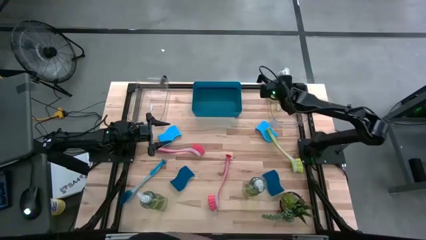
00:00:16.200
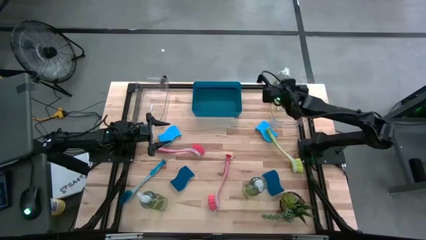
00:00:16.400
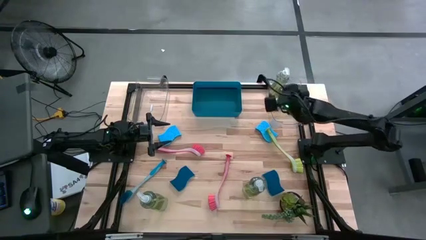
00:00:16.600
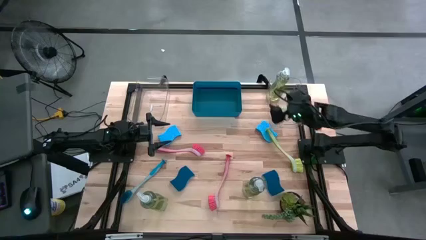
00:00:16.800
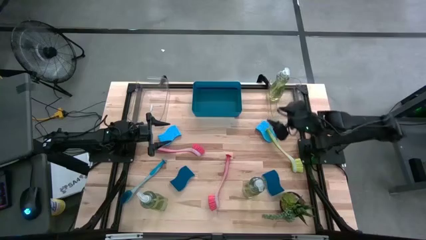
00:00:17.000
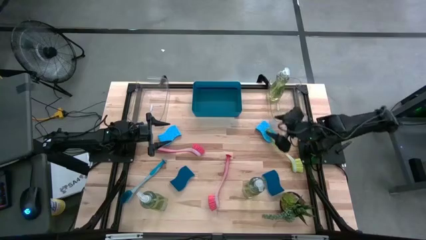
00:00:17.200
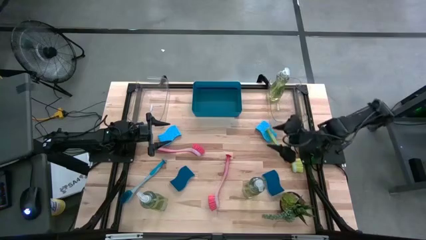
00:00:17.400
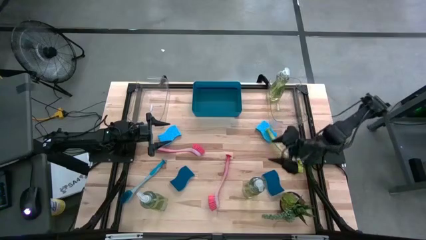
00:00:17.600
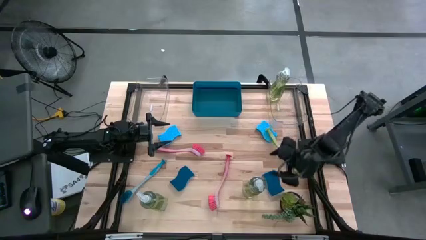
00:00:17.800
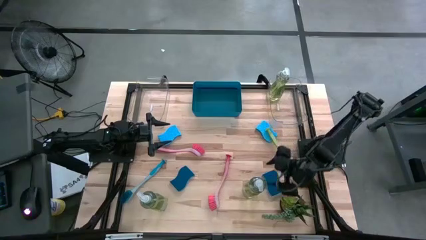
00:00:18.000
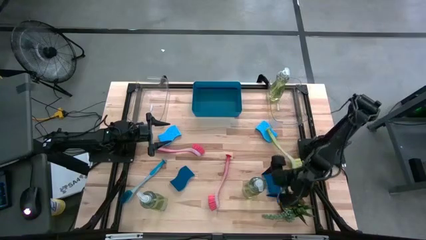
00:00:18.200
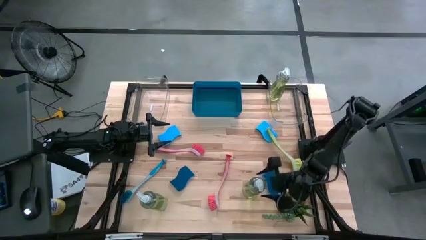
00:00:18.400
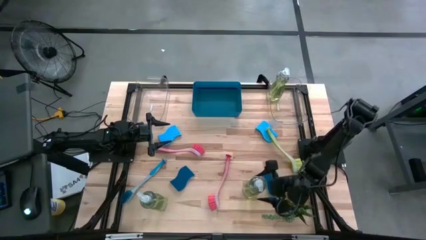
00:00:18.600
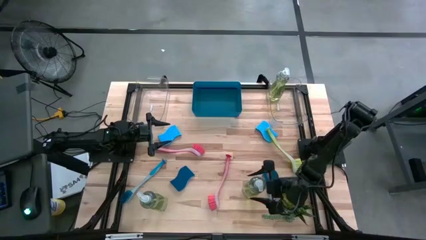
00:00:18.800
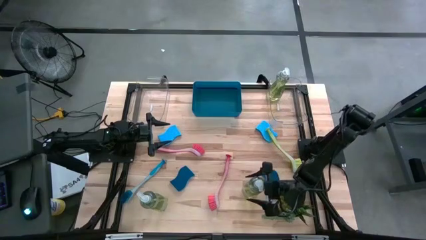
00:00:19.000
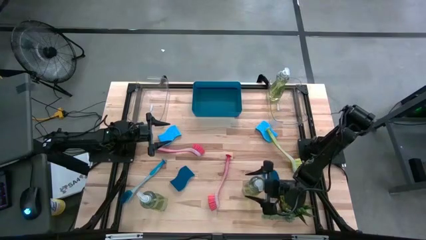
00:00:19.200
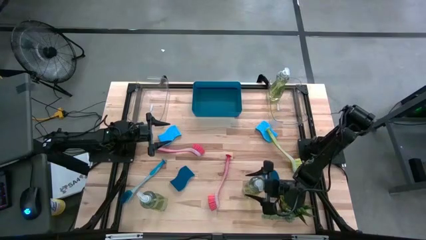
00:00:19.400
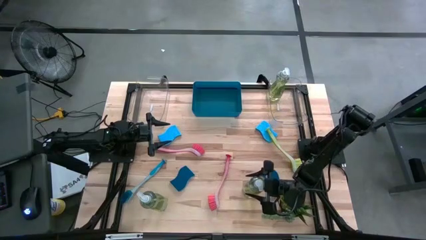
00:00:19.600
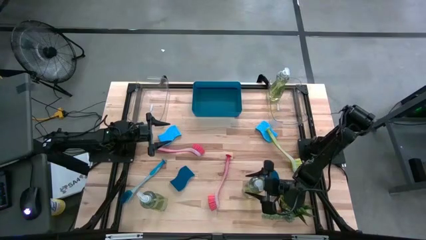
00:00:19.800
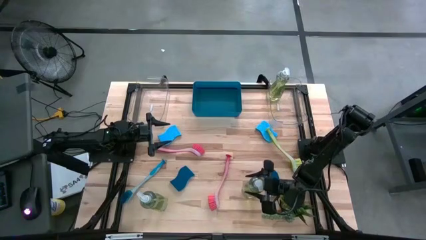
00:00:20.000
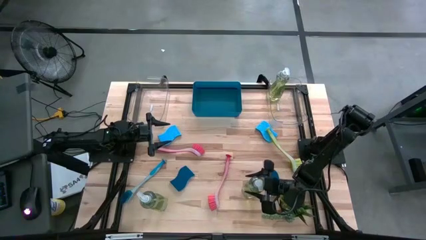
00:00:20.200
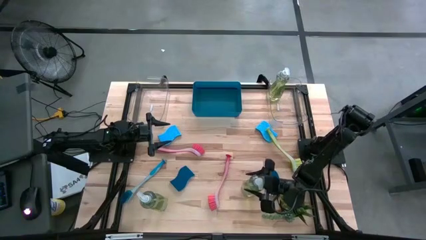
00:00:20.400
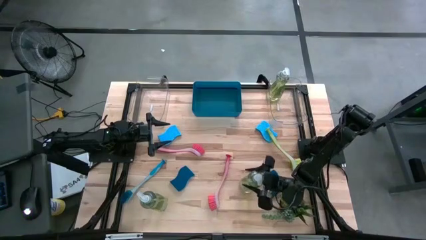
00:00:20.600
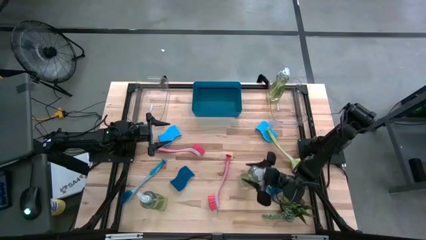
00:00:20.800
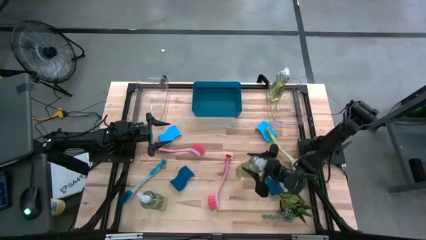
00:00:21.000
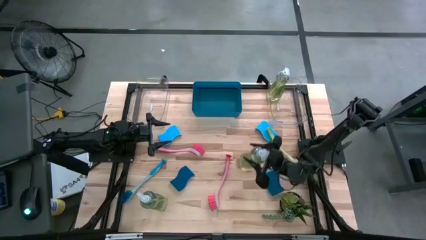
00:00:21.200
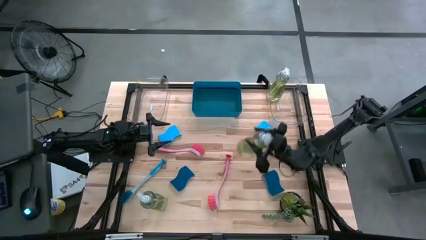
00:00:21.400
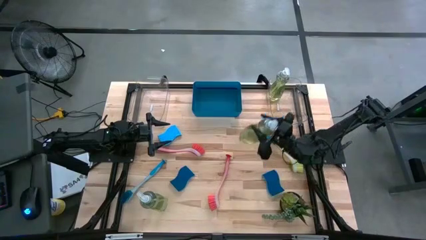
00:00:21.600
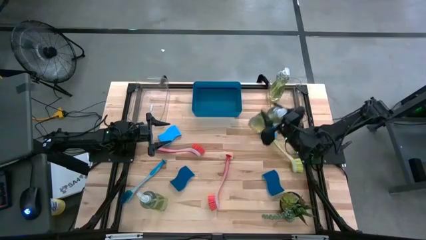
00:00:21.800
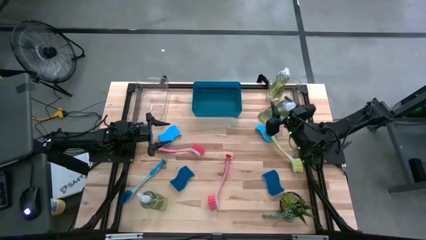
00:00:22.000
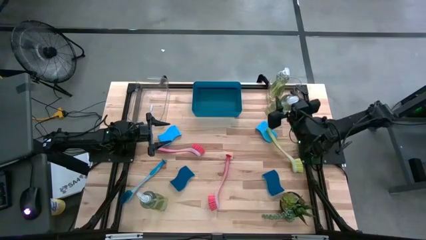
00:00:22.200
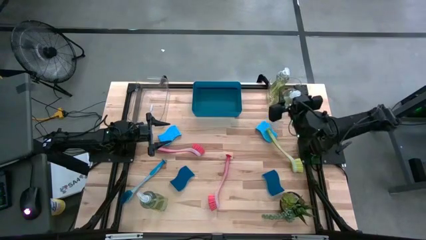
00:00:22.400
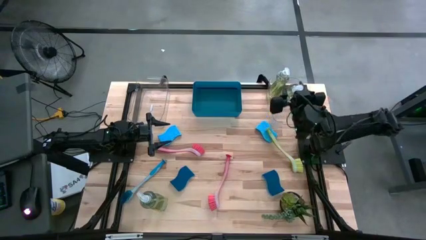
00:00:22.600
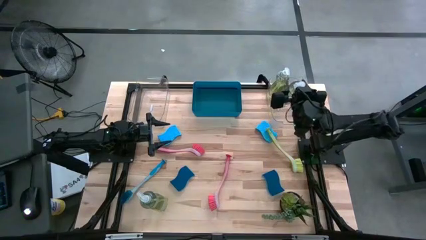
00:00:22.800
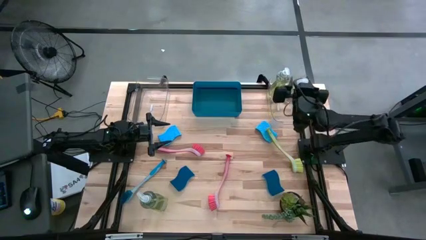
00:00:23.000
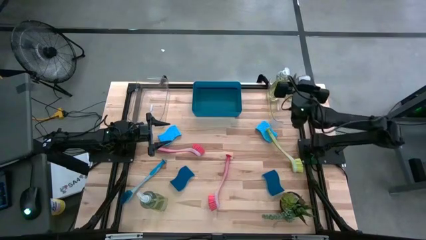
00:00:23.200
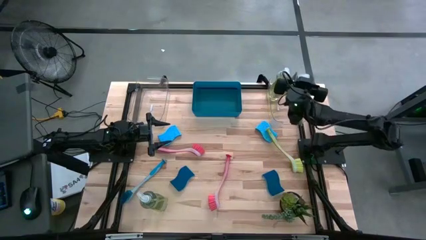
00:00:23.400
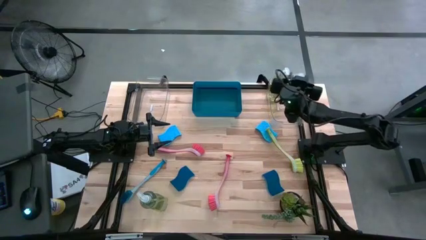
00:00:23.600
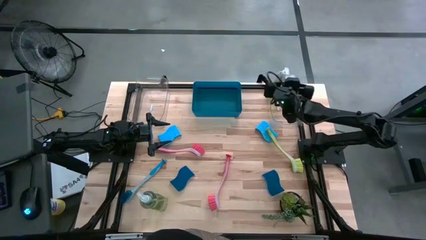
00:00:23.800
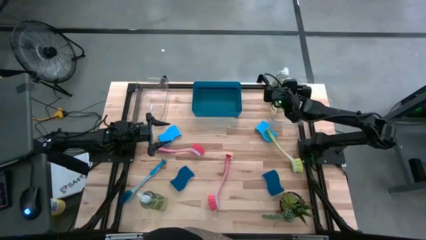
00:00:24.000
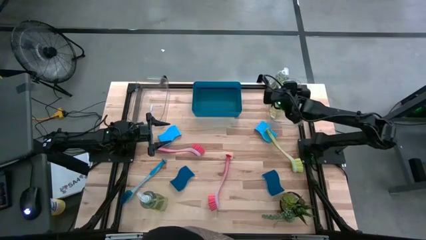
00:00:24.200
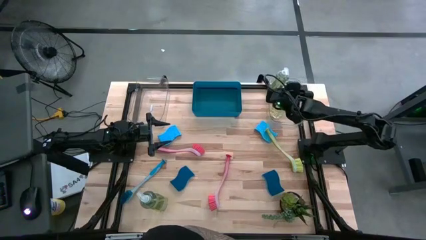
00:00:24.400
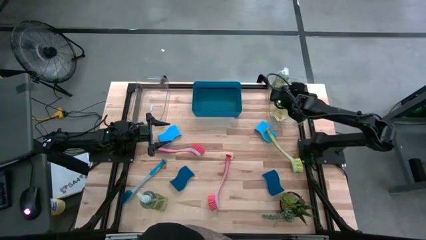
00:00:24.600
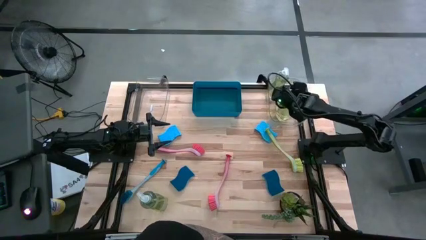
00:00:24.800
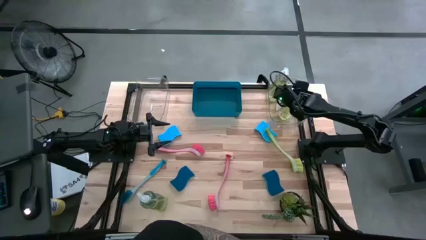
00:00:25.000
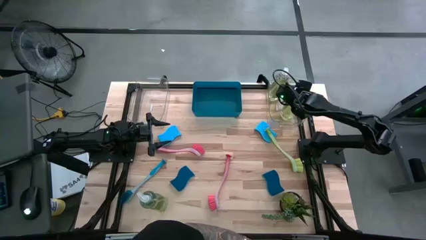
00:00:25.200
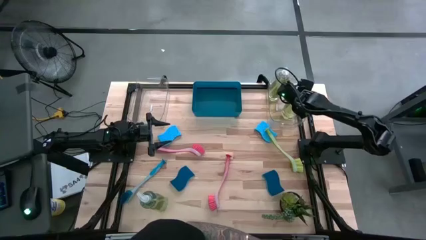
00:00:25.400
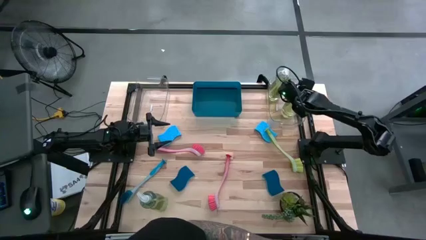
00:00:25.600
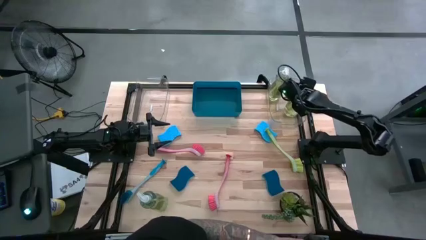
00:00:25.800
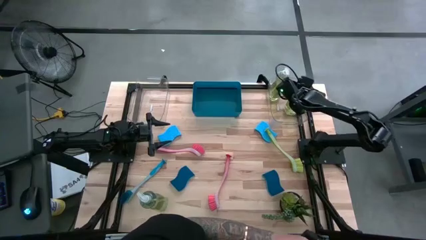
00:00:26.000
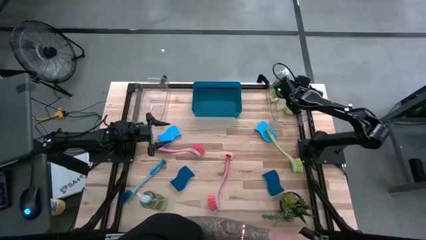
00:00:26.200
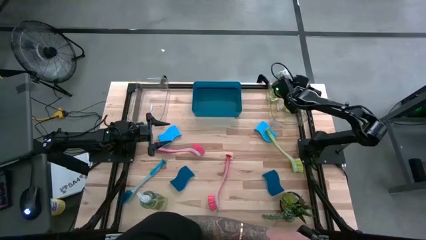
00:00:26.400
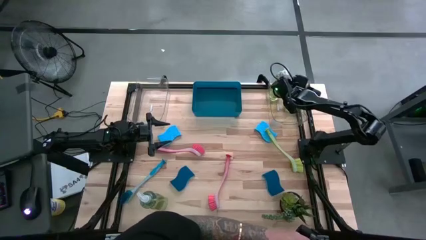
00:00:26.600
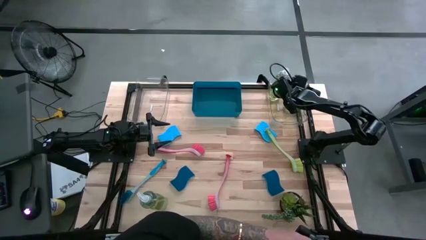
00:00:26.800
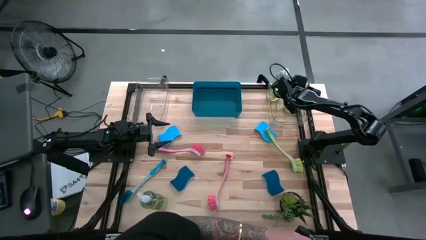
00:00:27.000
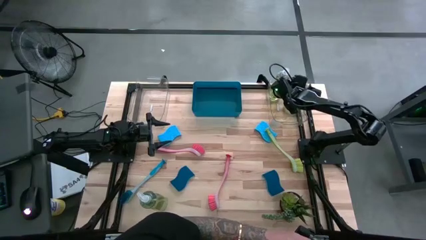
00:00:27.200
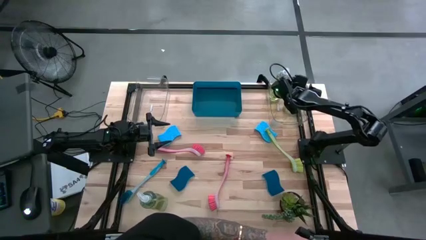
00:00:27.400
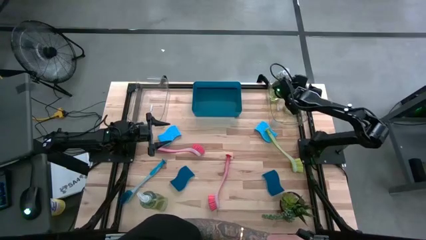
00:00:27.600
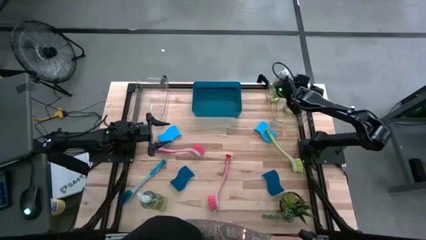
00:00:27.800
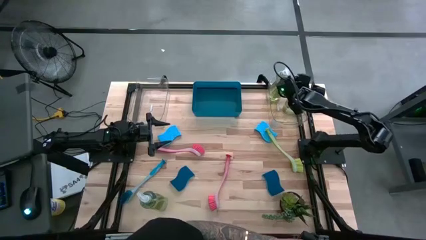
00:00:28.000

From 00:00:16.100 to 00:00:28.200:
Task: Pick & Place Kitchen Sink Supplies
Put the right green dish soap into the right transparent bin

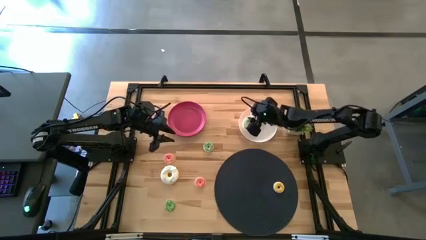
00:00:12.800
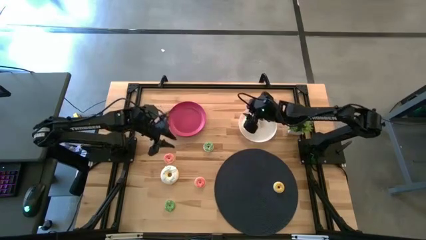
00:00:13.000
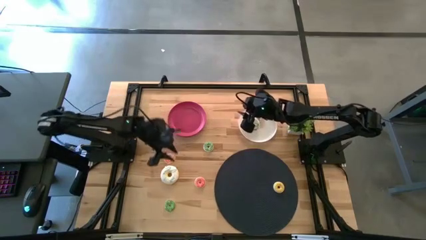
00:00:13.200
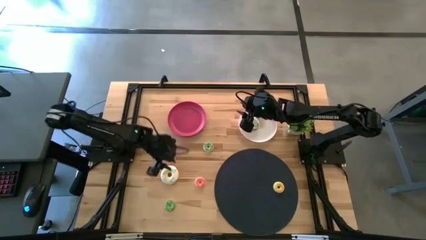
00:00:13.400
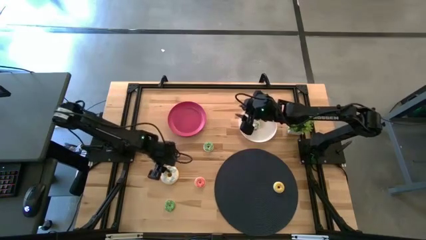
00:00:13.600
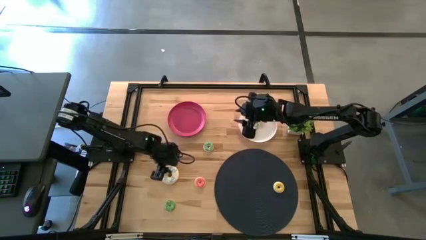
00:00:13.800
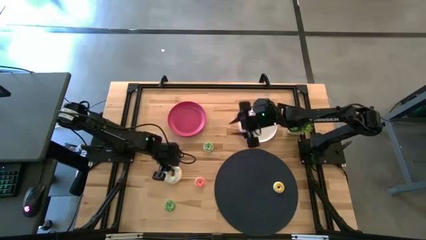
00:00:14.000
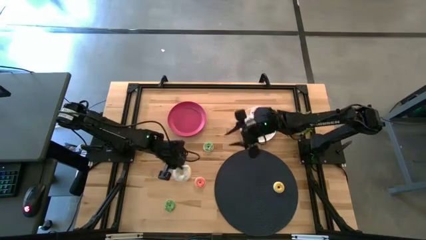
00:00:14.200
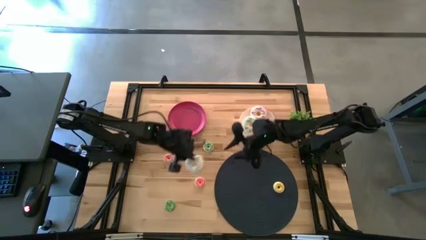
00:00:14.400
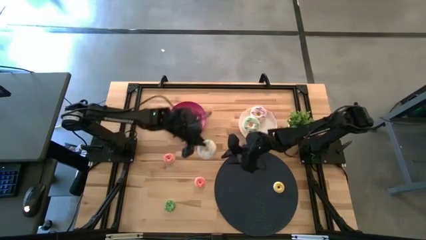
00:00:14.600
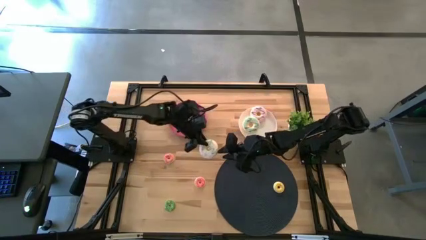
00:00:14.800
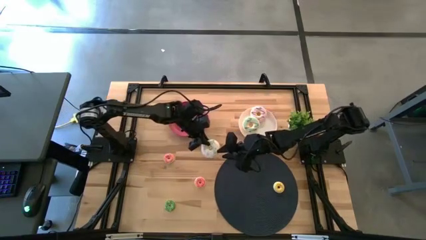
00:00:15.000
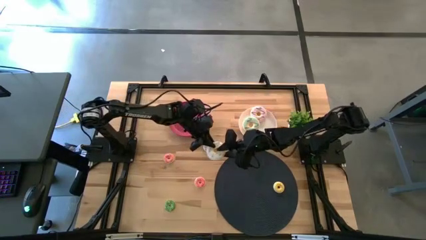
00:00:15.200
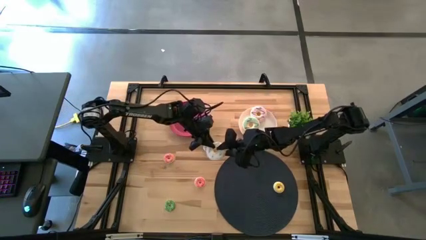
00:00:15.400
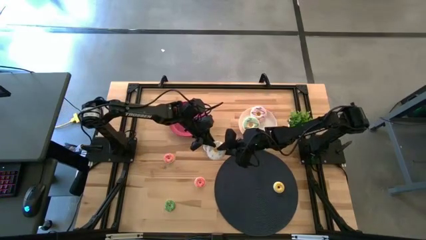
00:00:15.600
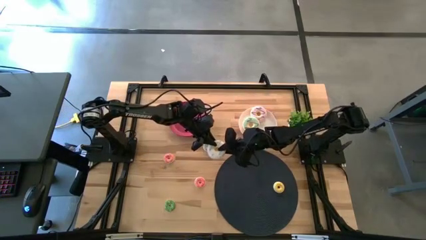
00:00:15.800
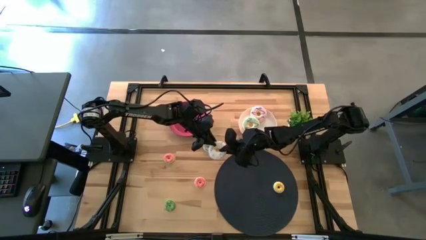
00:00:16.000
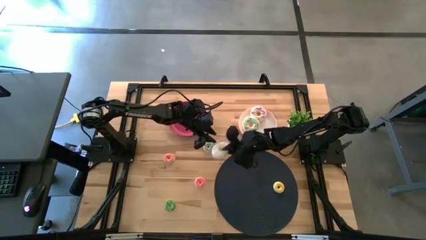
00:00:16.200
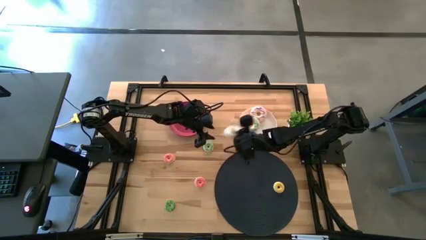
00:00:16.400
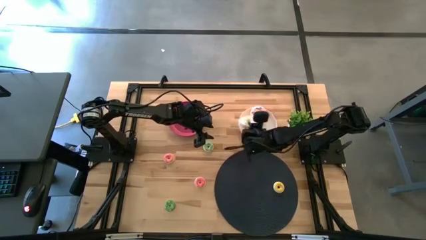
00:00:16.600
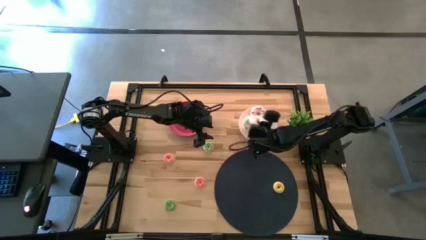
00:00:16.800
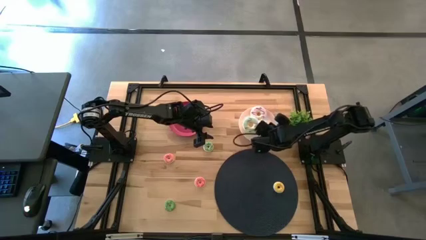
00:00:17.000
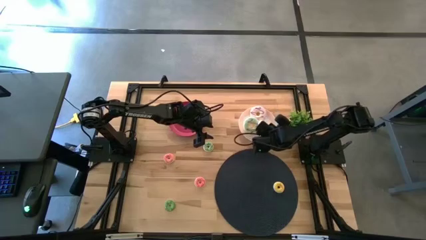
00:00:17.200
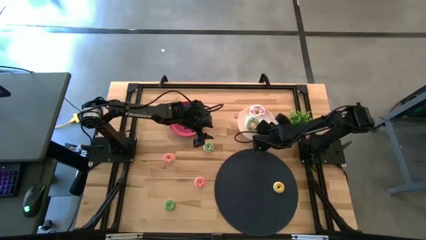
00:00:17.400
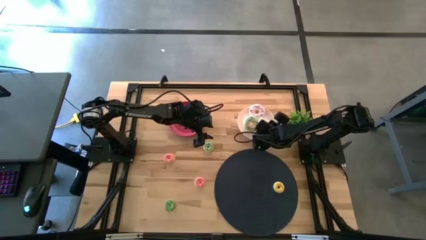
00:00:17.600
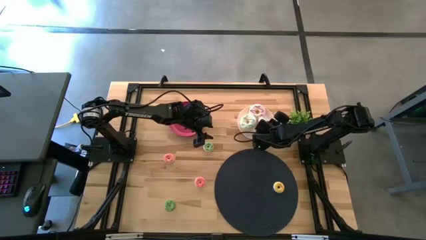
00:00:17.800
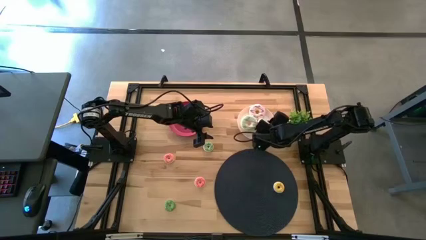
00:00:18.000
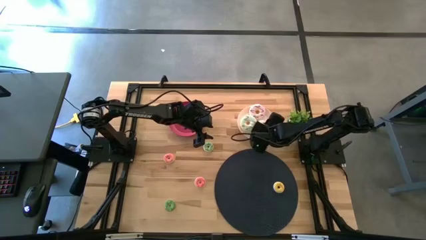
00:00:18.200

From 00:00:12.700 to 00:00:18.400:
Task: Pick & Place donuts
Put the large white donut on the white plate
